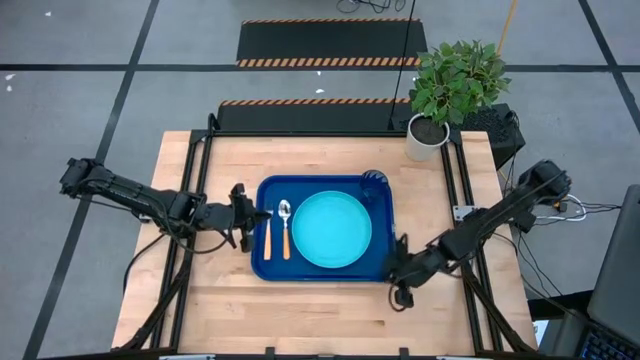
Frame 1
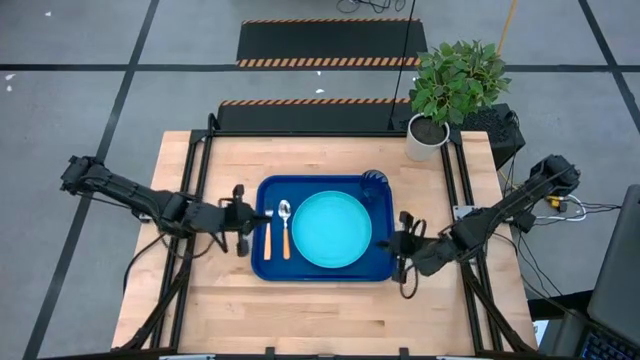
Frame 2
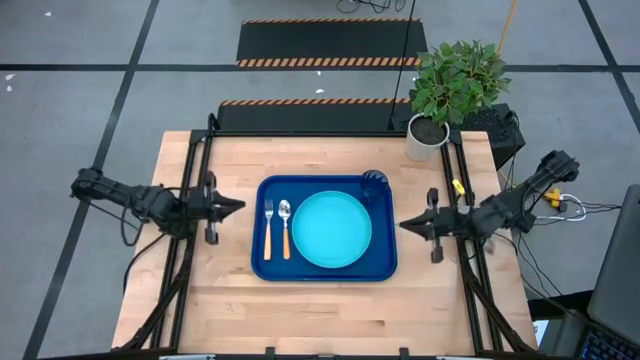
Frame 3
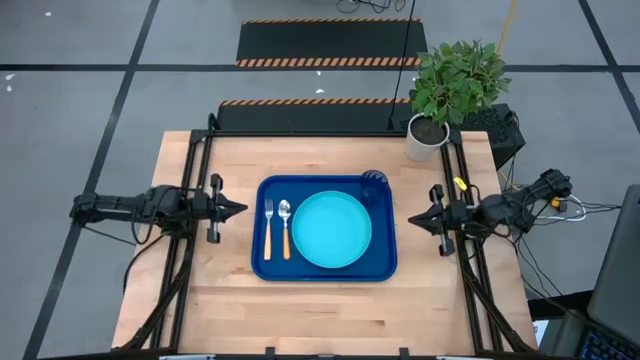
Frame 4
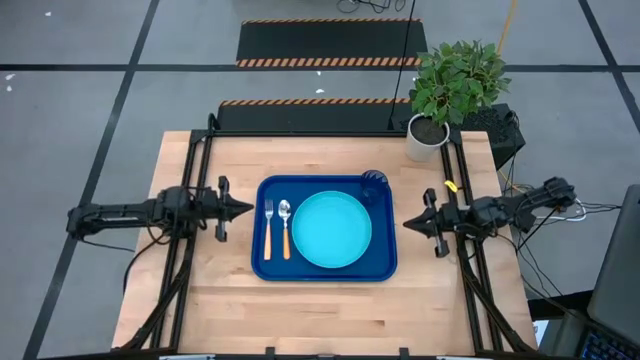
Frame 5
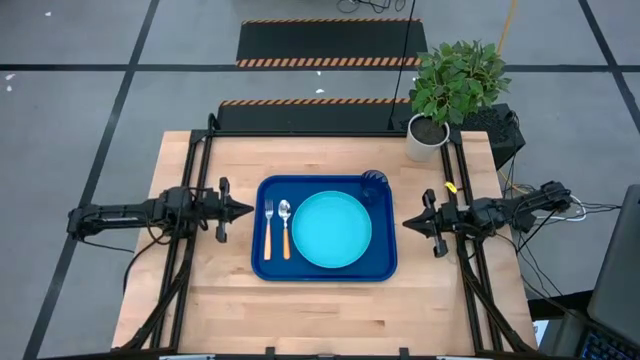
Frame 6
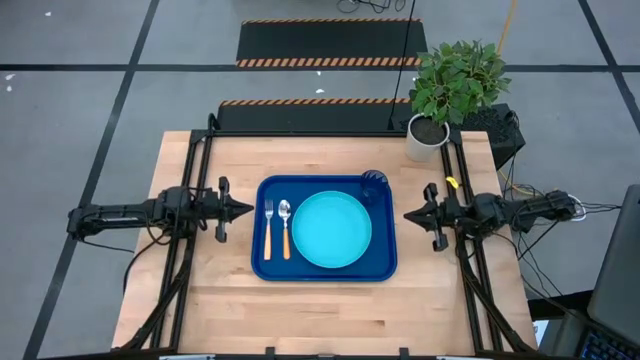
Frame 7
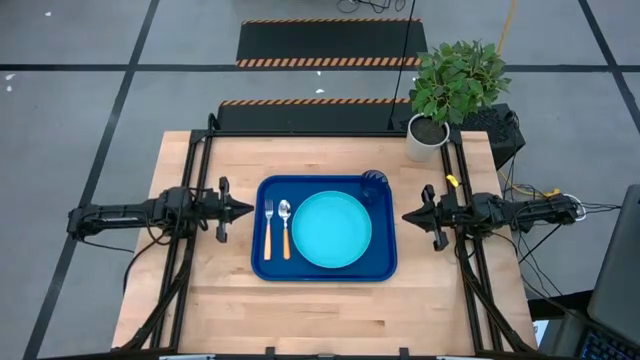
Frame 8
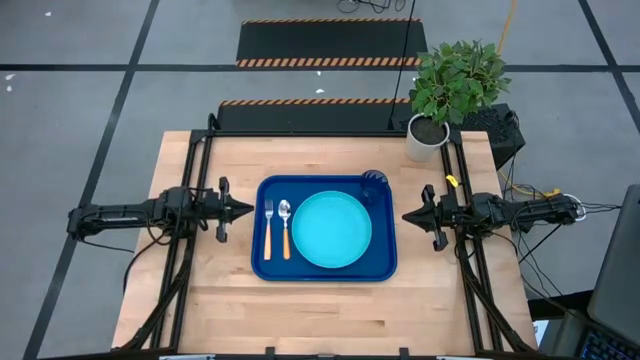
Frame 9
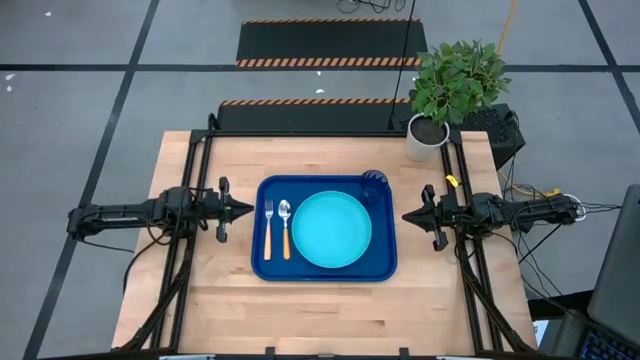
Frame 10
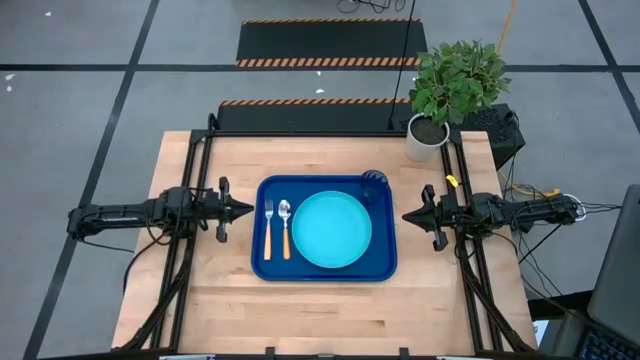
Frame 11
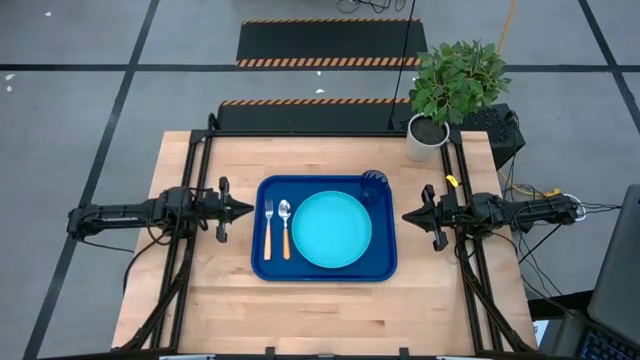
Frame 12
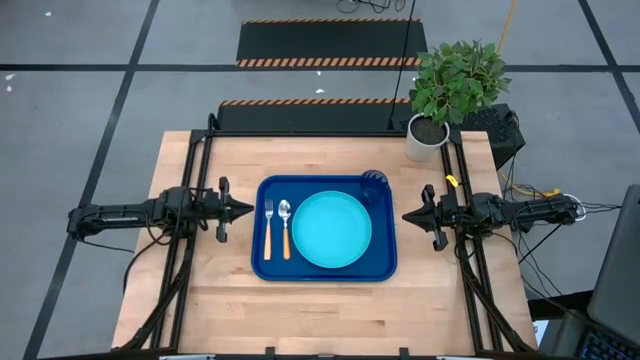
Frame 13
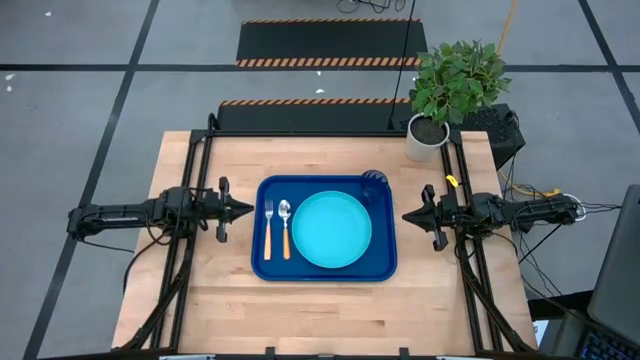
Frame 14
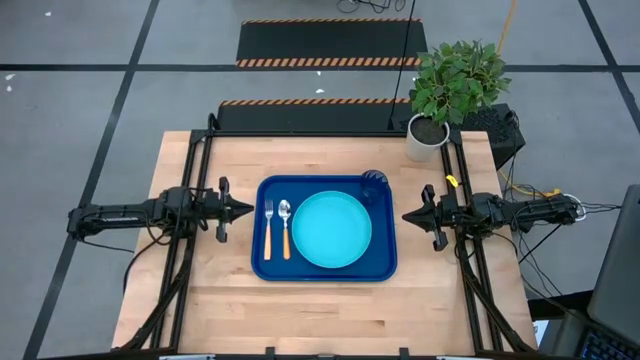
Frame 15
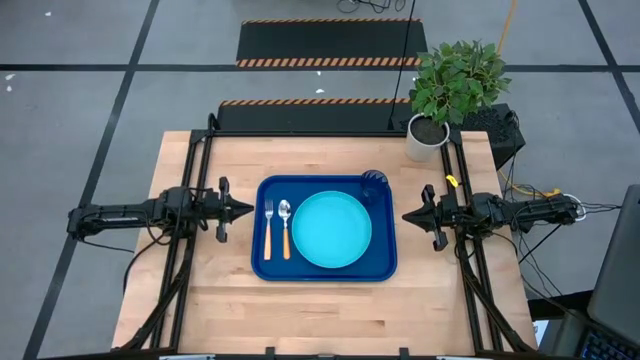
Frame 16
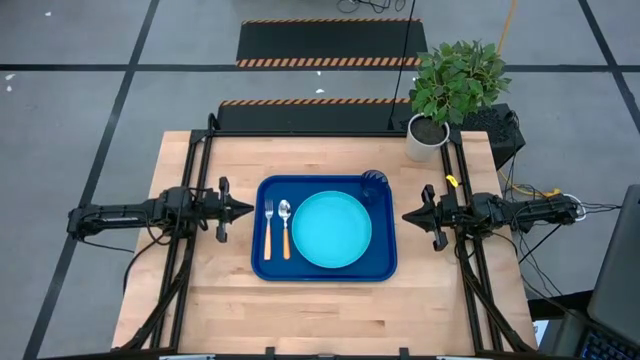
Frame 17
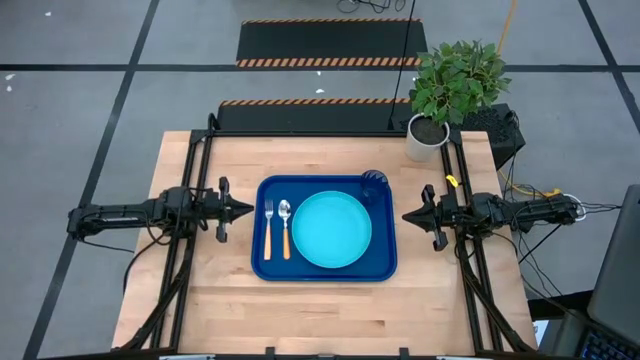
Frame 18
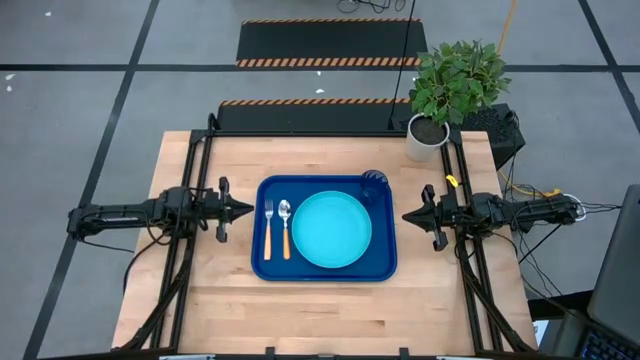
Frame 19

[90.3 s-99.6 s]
Task: Pick and place plate/cup/fork/spoon on tray
Return to Home Position

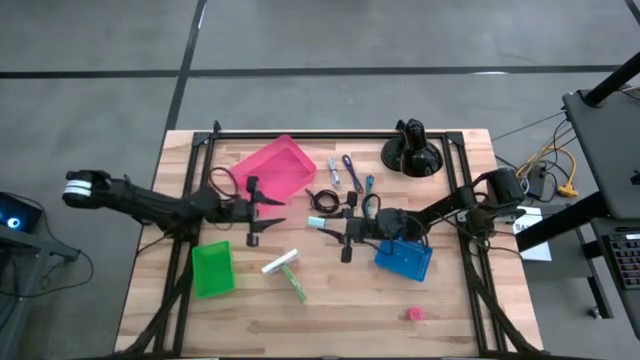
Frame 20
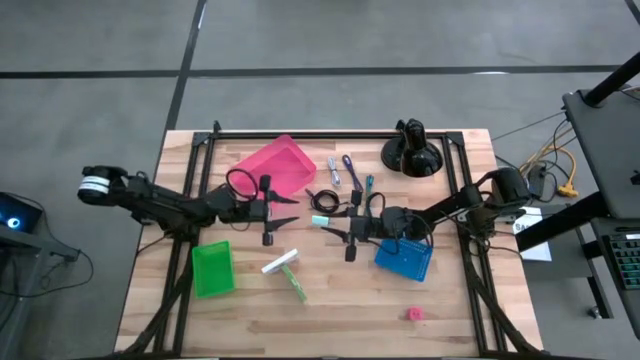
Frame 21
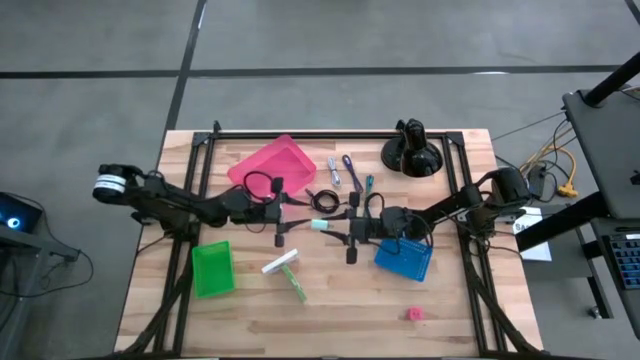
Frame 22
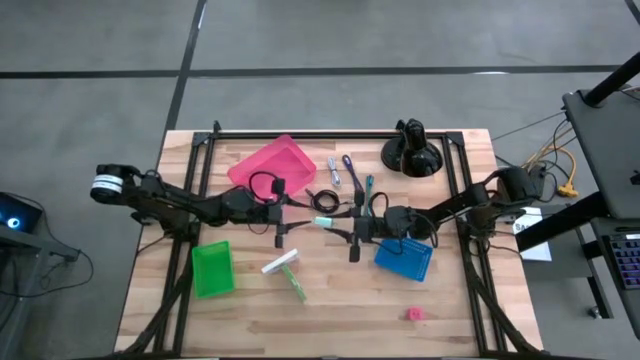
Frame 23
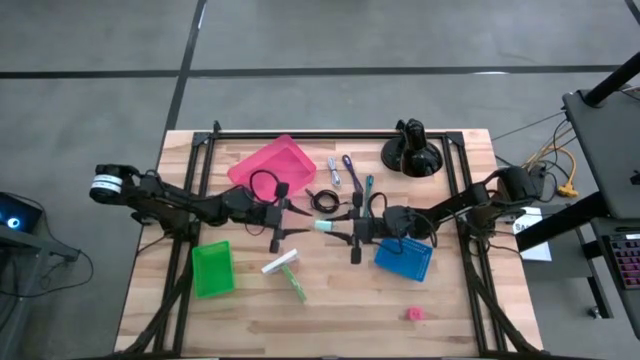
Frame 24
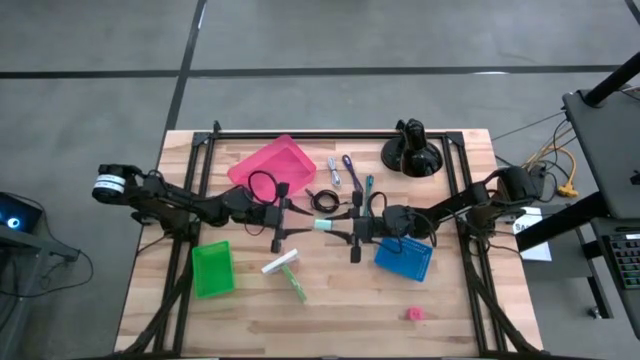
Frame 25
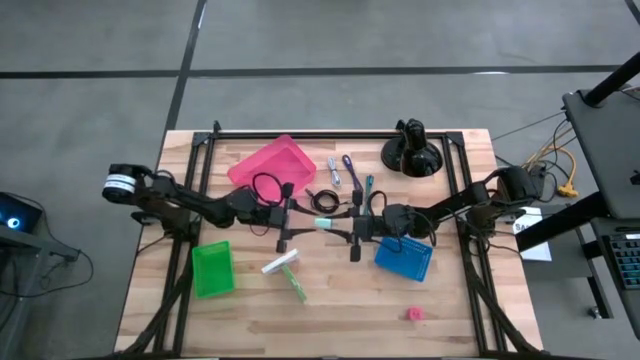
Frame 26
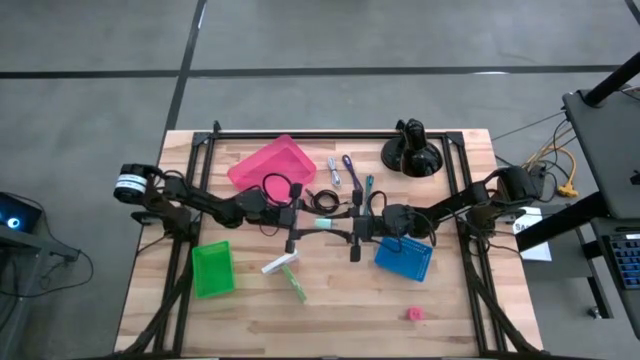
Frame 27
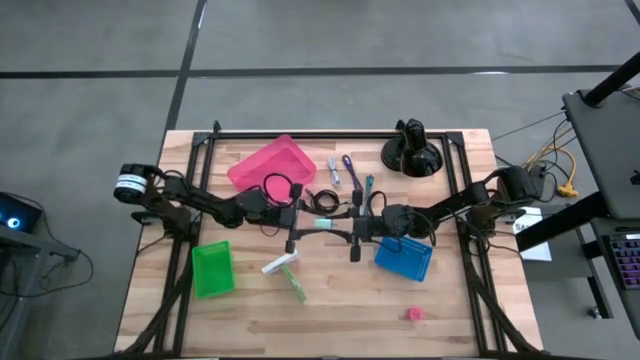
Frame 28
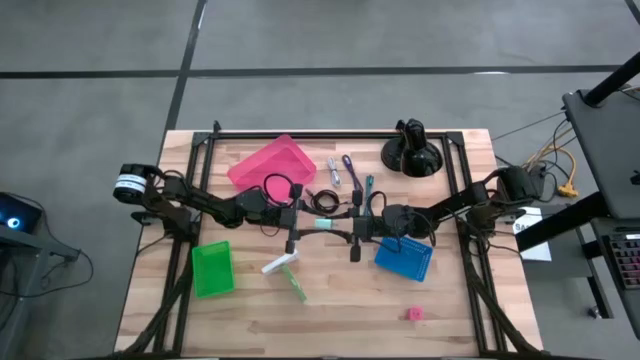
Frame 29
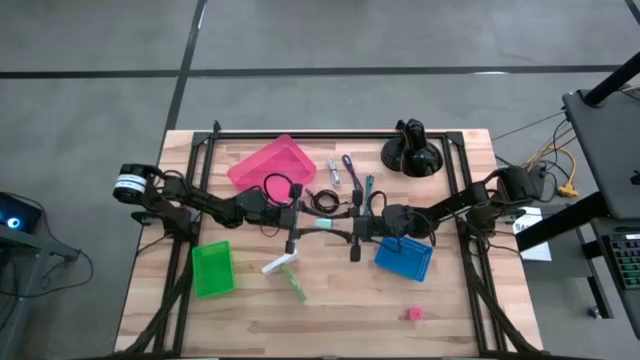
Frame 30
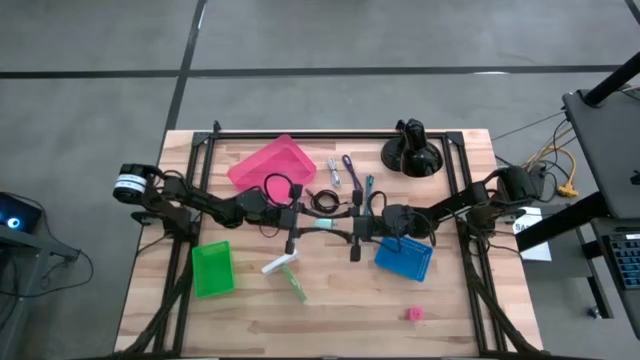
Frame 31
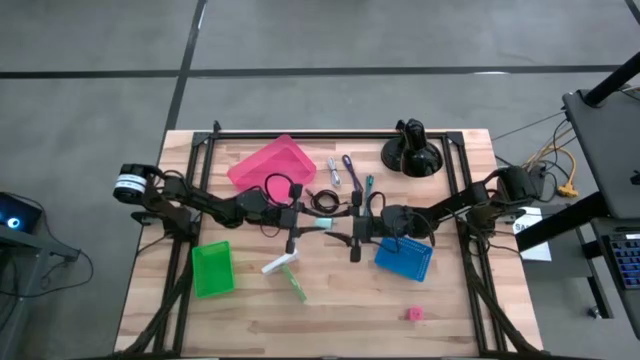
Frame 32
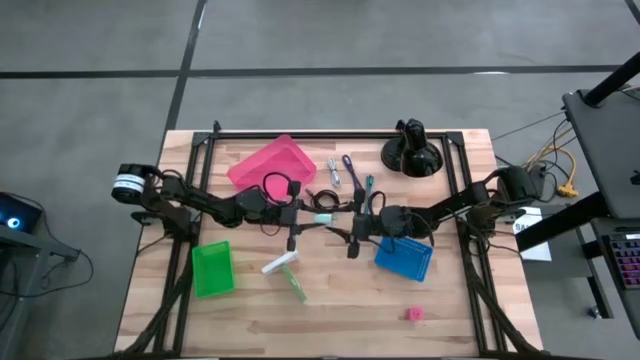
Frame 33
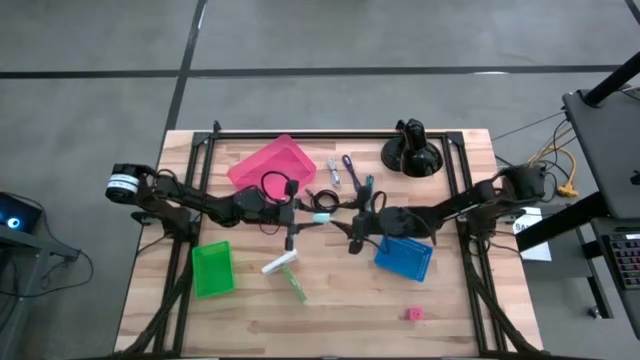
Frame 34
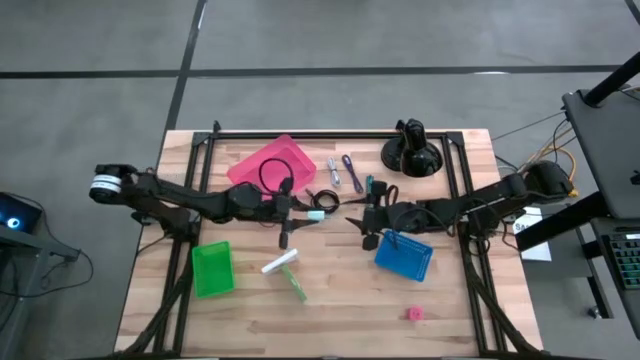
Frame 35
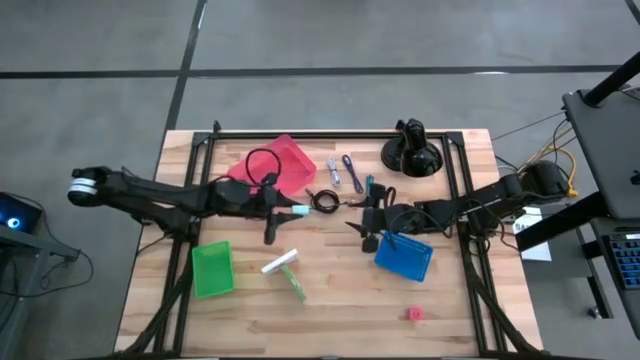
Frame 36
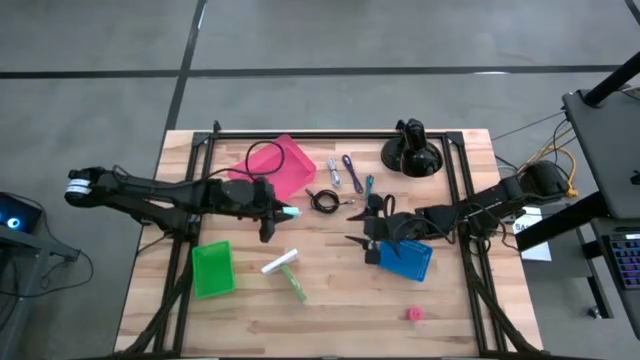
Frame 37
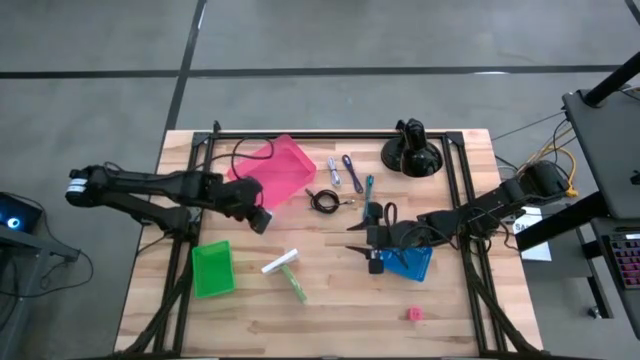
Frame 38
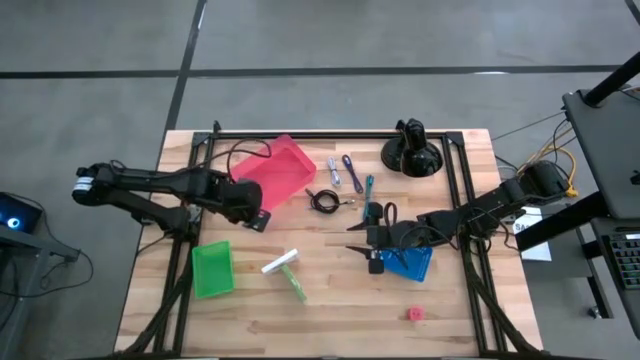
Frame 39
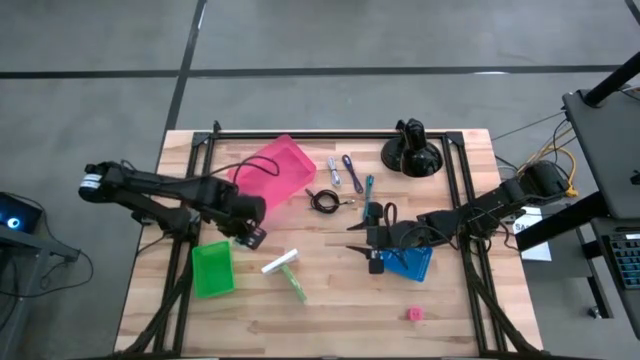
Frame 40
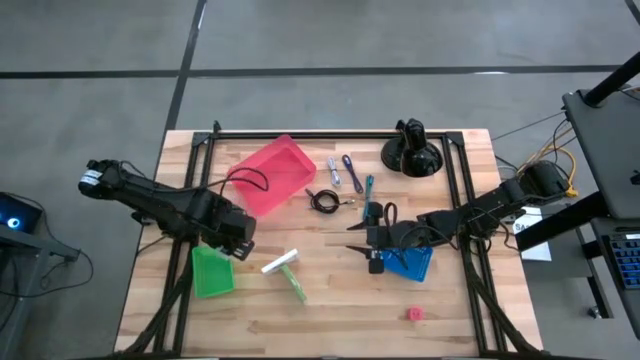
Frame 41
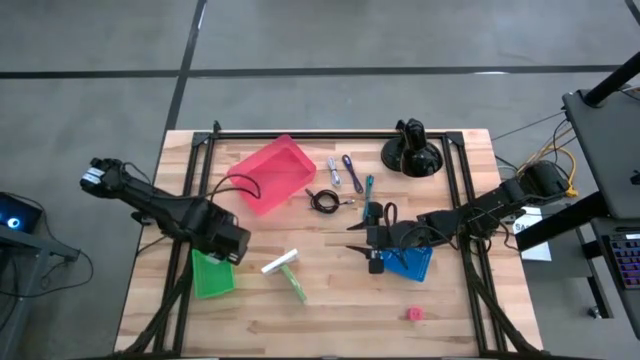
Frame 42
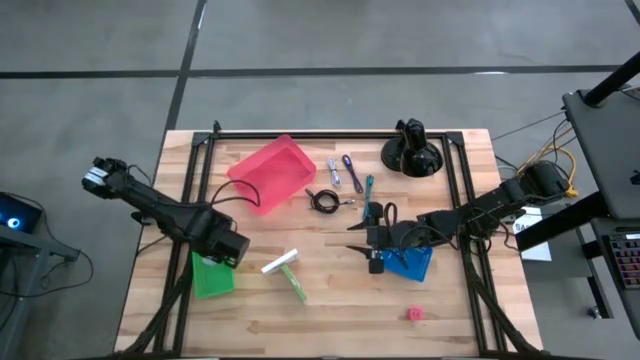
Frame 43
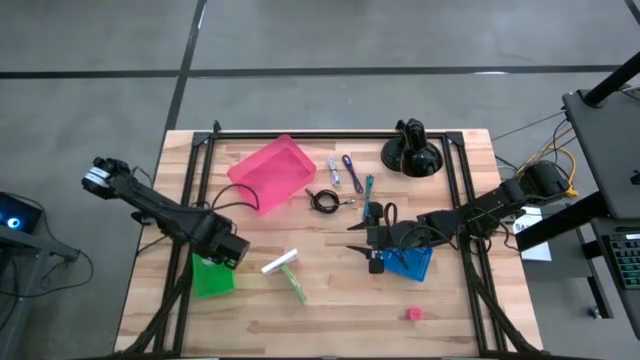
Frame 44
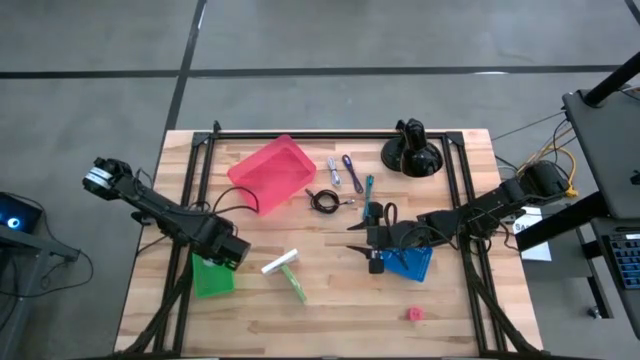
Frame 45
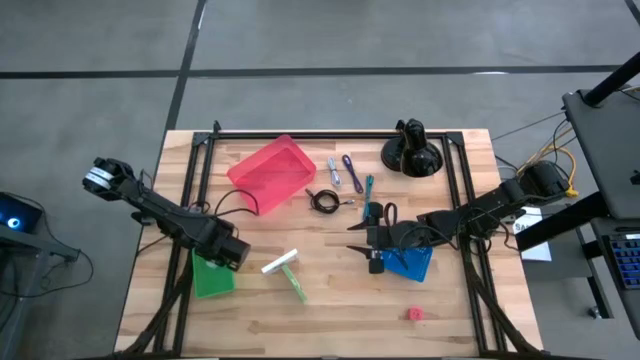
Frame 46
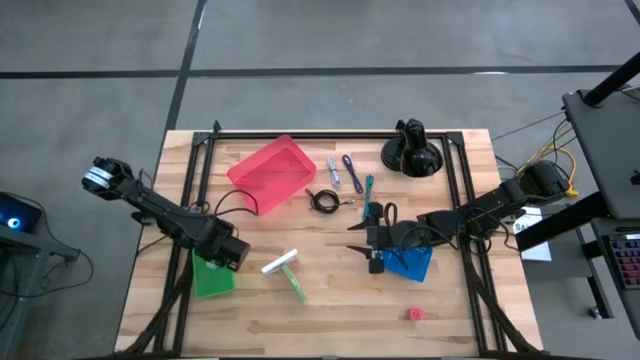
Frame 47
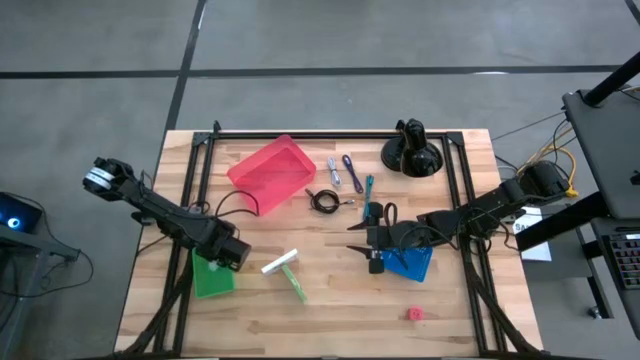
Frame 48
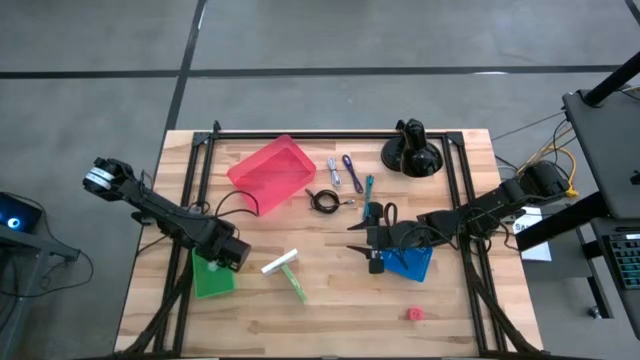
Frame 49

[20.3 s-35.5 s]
Task: Pick and place items into bin
Put the blue charger adapter into the green bin
